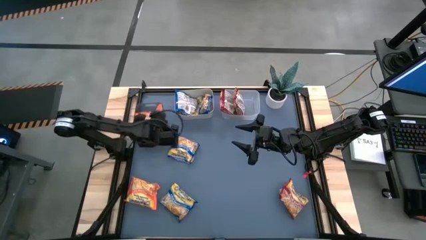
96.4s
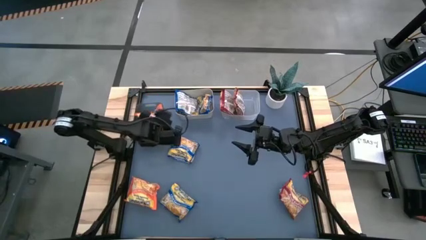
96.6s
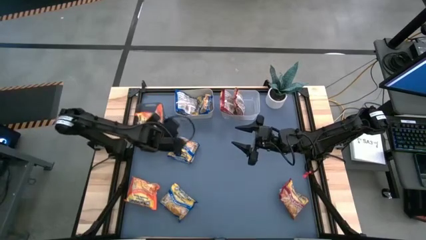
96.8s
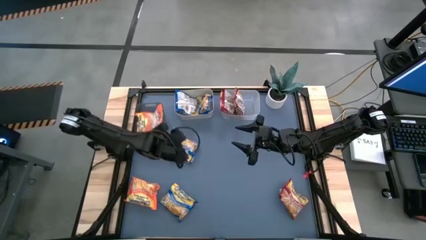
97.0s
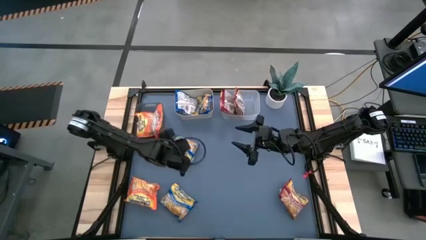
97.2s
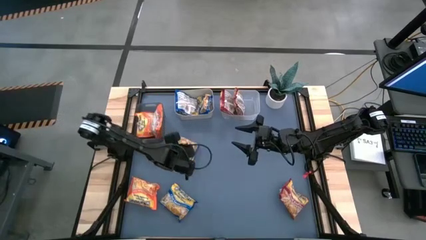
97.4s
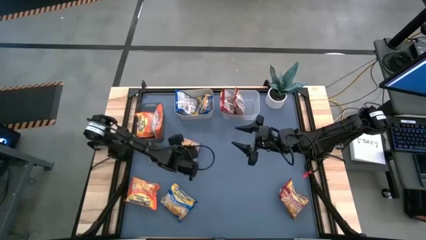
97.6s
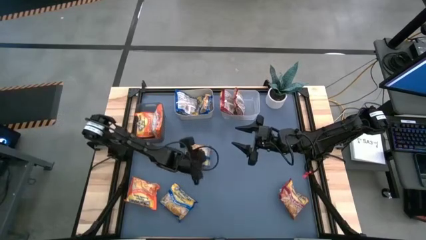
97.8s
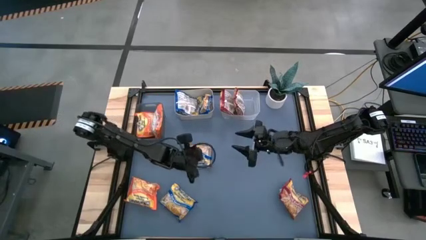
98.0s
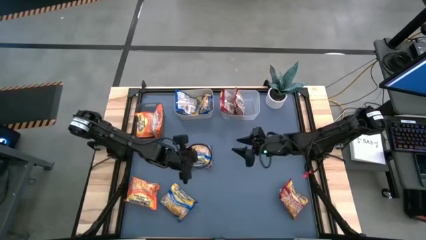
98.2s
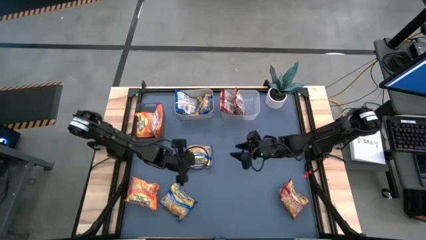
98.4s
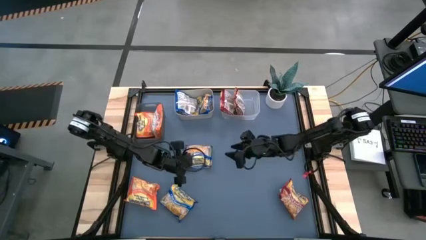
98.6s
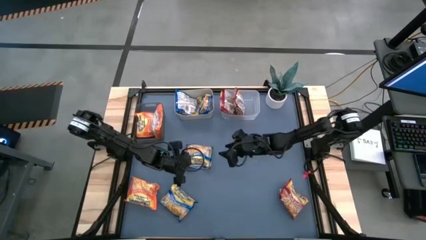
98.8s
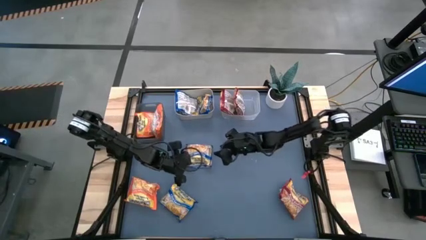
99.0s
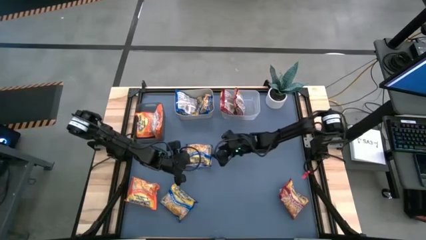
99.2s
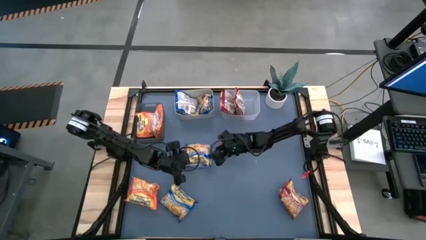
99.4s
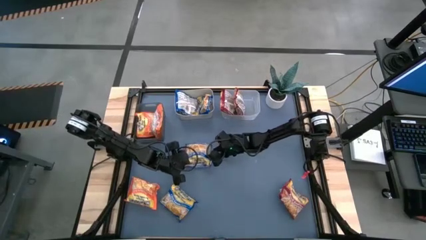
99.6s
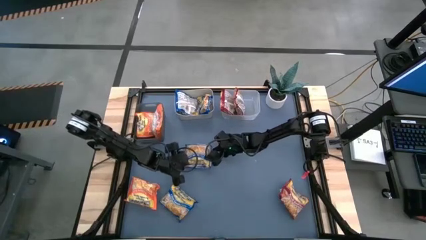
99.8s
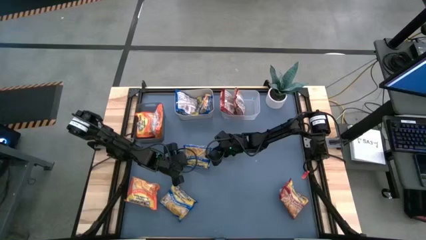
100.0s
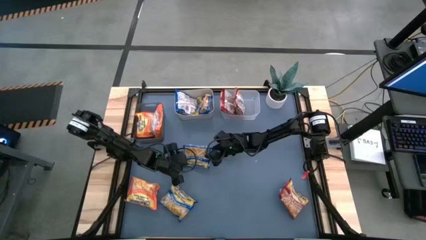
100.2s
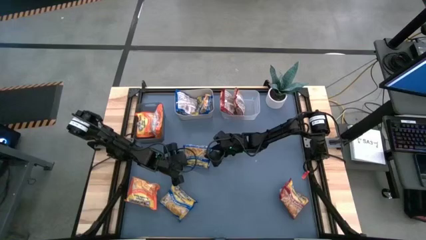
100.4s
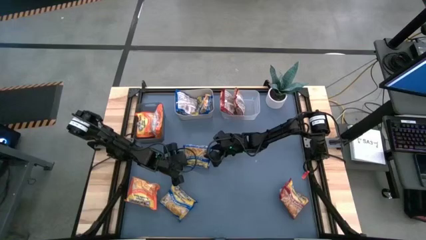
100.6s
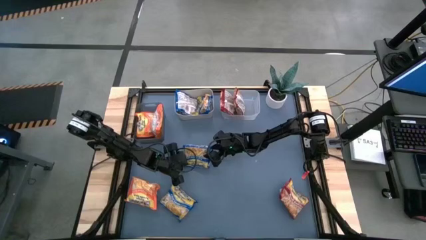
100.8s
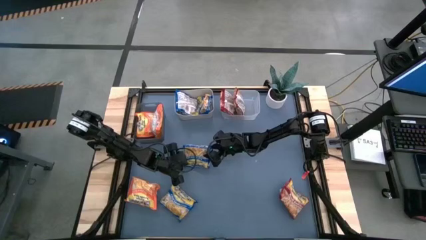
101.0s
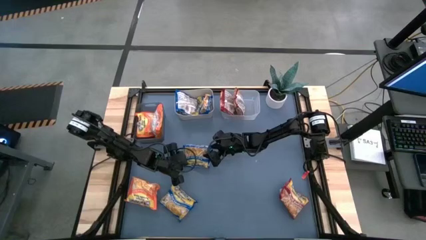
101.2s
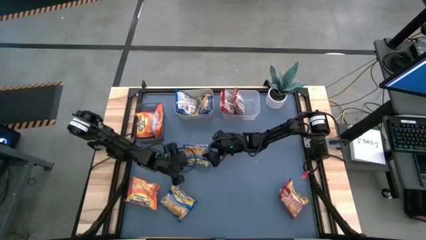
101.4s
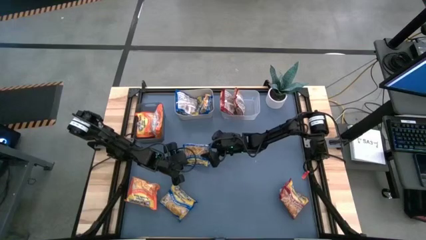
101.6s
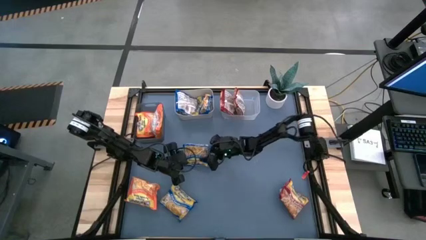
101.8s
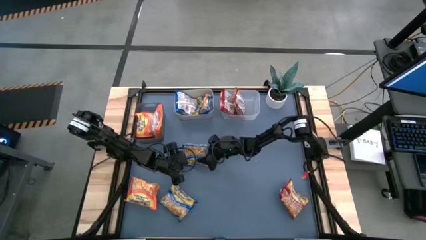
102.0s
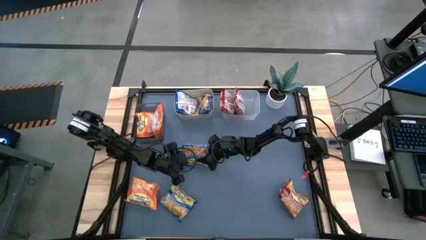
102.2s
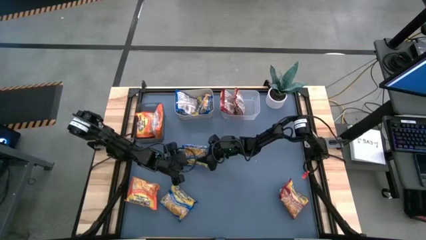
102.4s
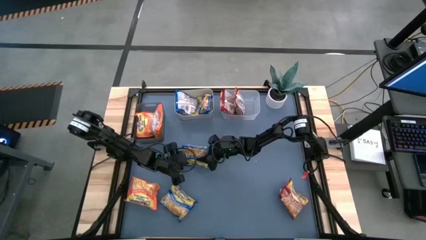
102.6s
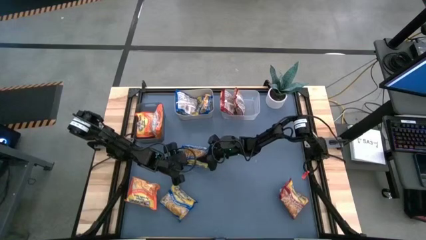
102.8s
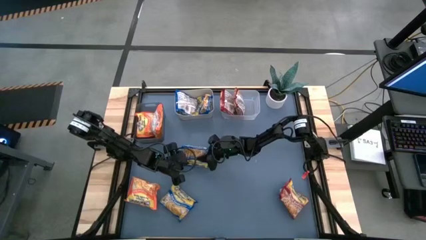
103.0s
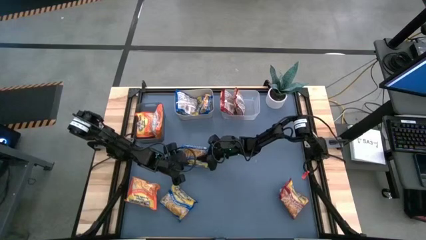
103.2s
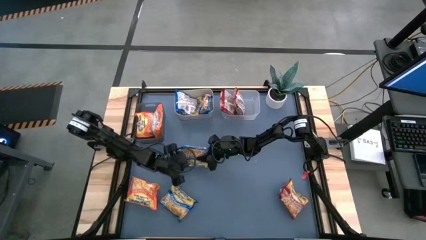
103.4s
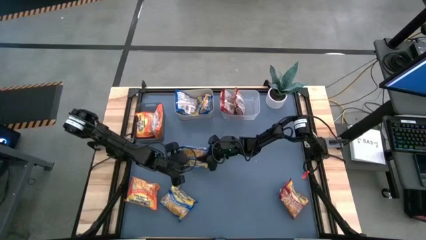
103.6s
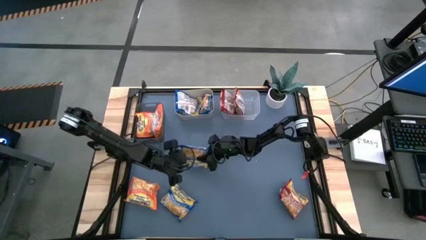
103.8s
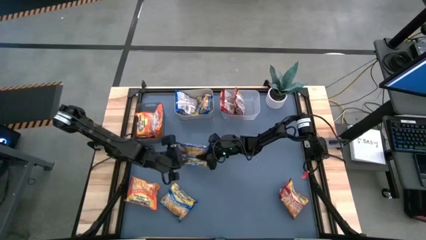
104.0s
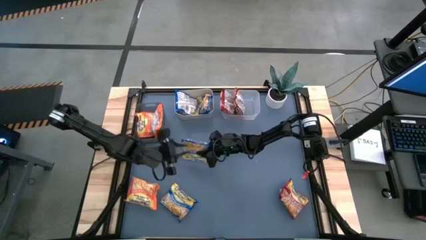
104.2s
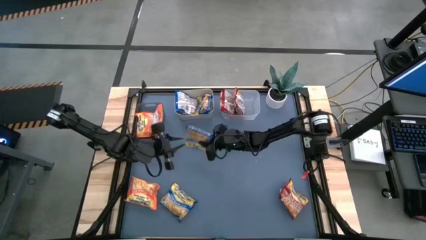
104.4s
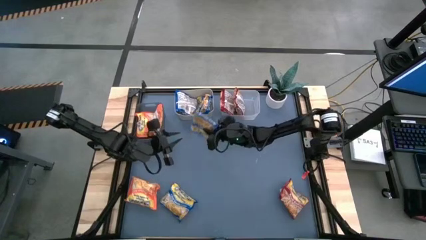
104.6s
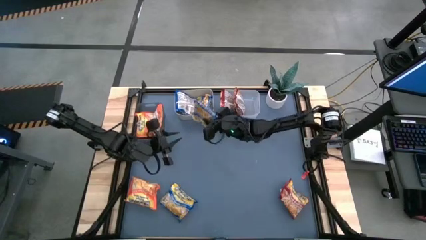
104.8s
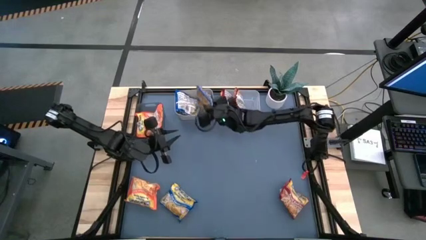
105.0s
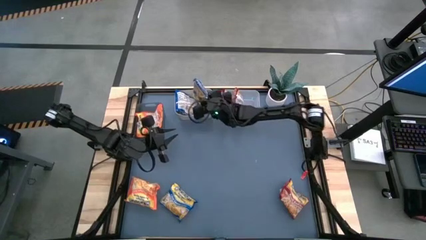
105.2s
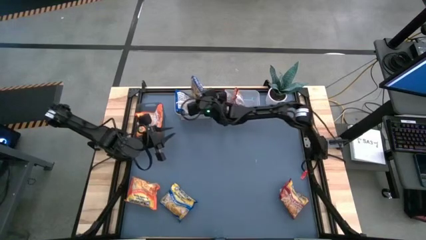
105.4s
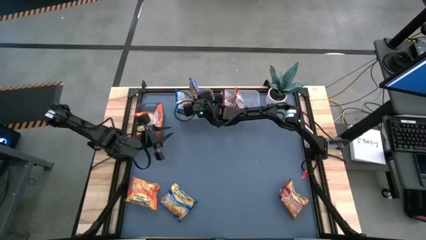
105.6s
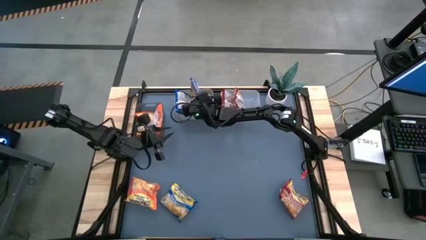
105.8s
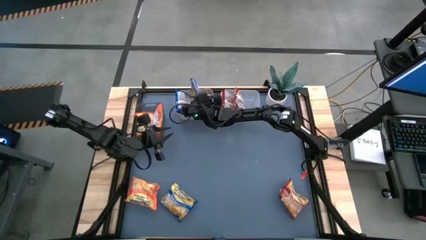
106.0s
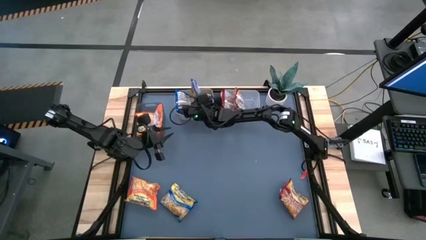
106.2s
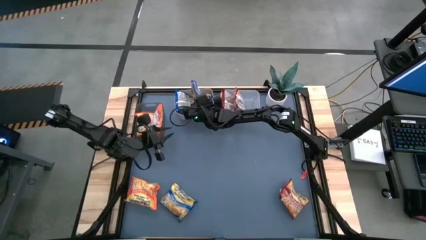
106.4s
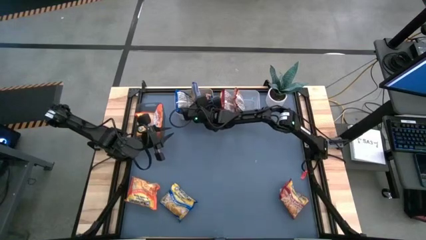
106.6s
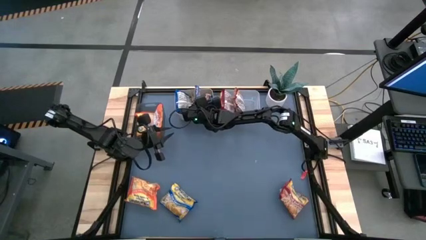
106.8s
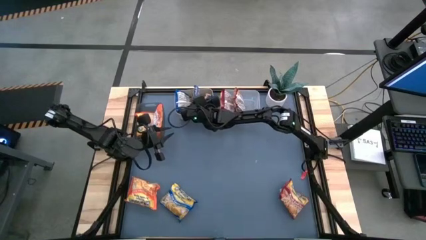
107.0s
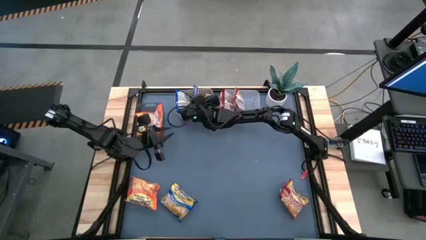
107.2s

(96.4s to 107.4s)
Task: Sort Maruchan noodles
Put the blue noodle pack into the gray bin

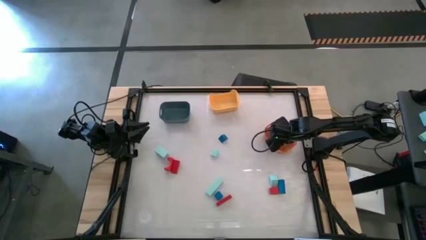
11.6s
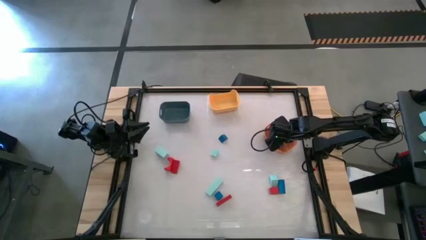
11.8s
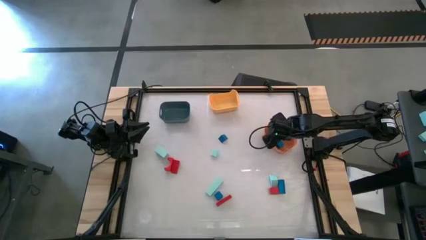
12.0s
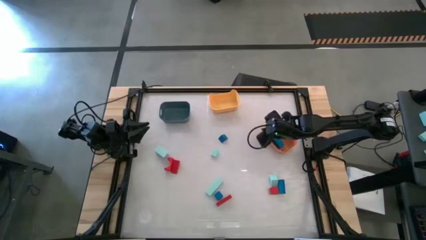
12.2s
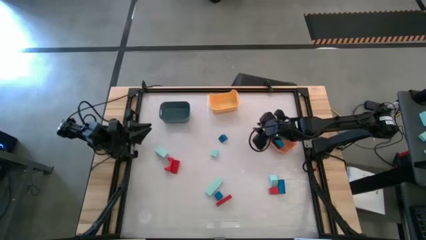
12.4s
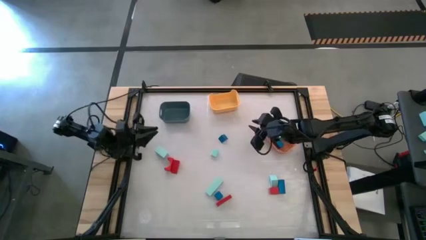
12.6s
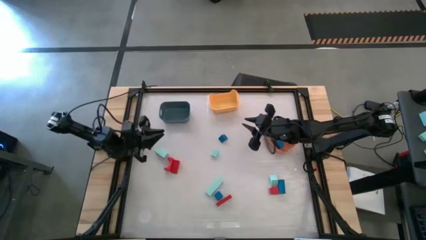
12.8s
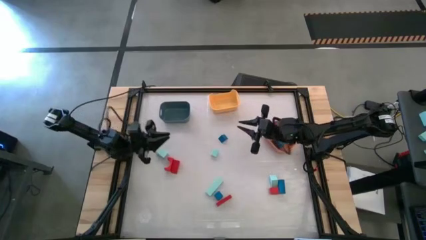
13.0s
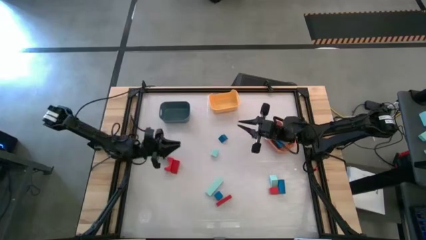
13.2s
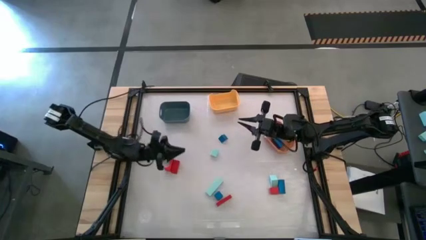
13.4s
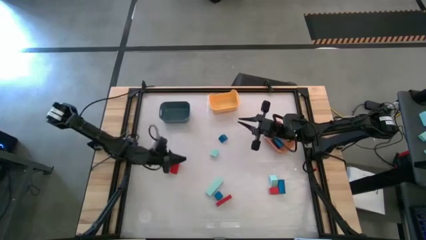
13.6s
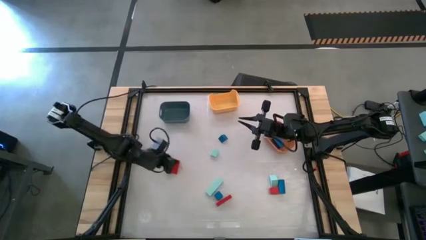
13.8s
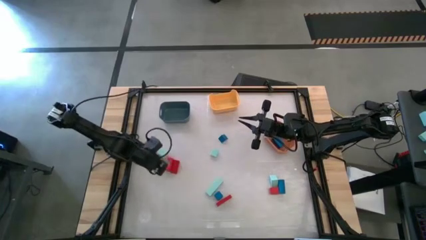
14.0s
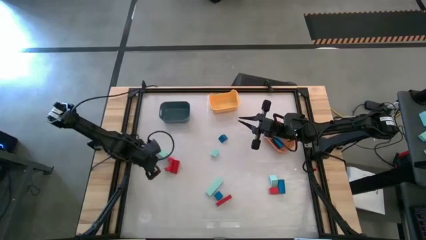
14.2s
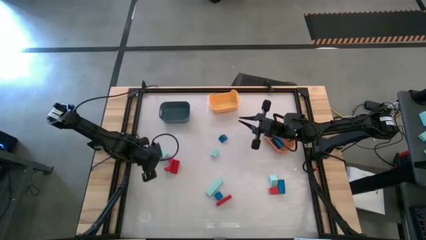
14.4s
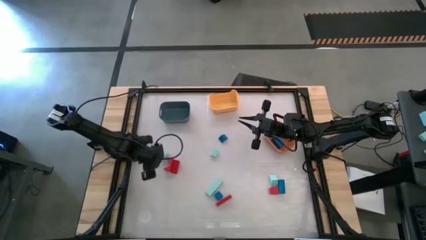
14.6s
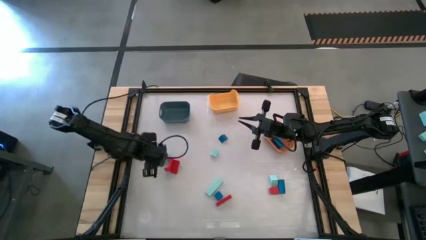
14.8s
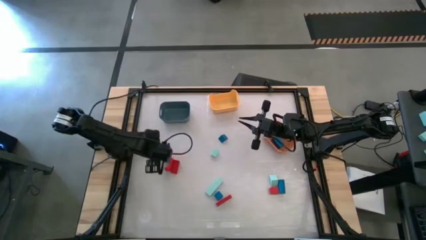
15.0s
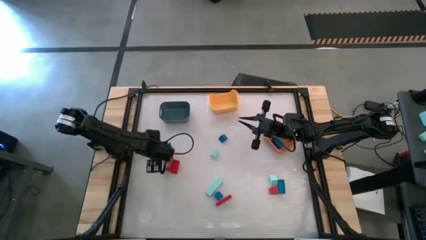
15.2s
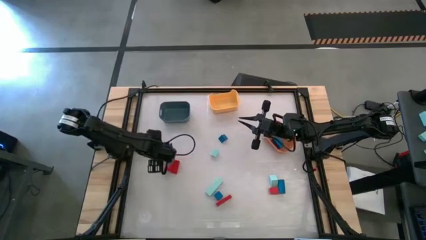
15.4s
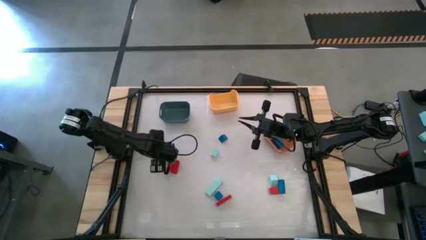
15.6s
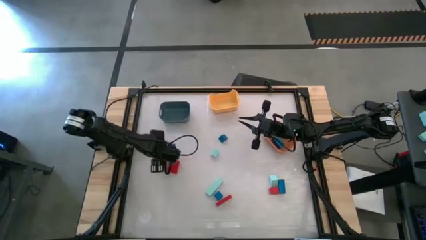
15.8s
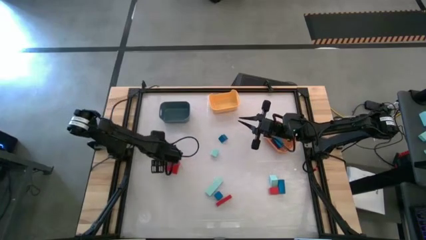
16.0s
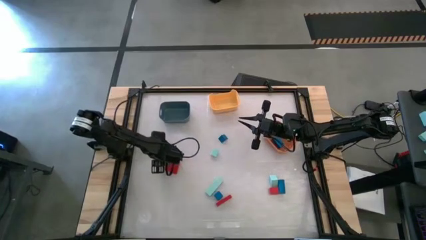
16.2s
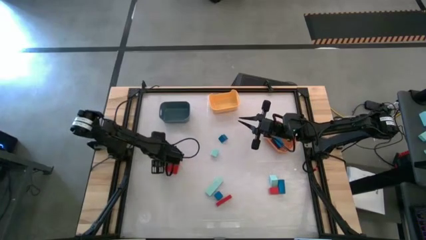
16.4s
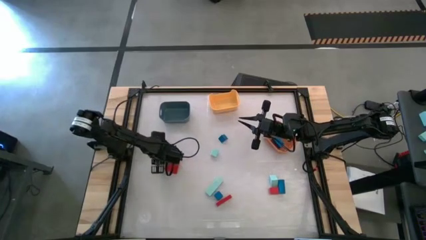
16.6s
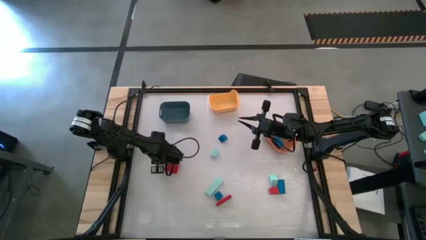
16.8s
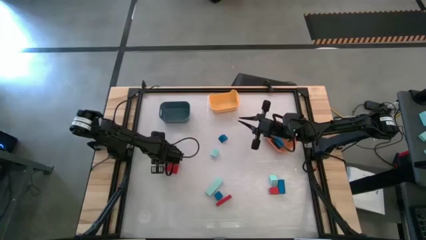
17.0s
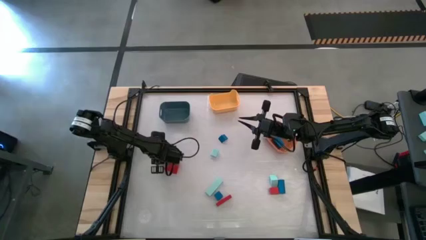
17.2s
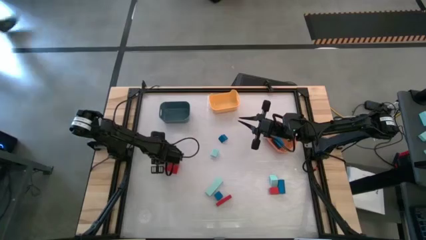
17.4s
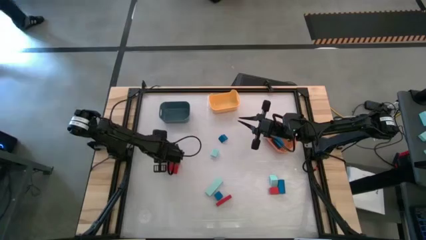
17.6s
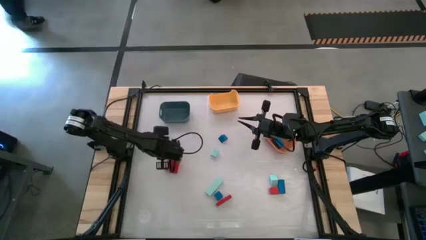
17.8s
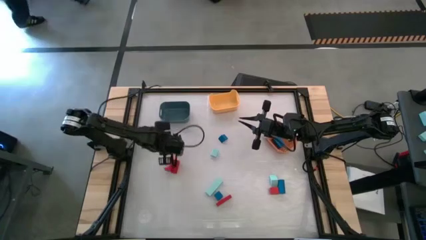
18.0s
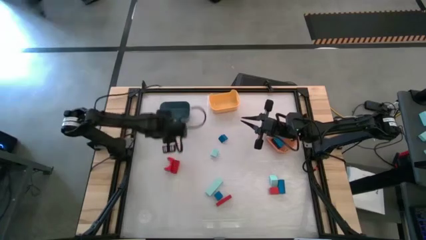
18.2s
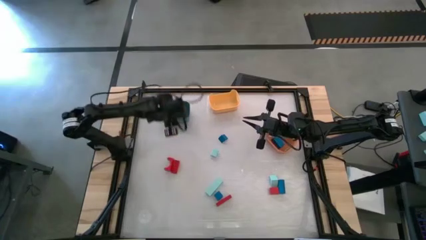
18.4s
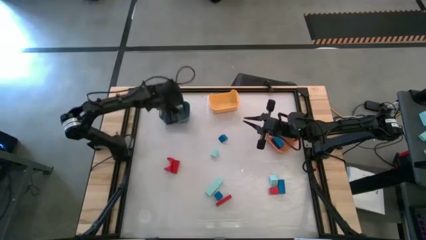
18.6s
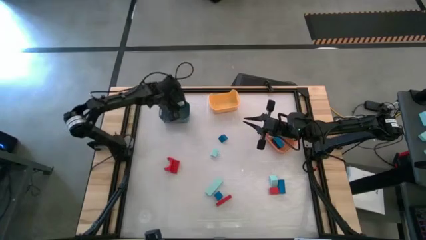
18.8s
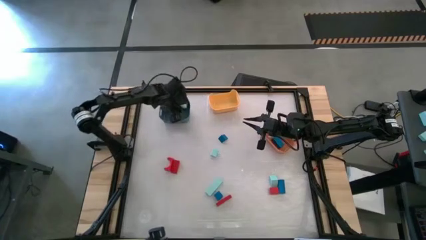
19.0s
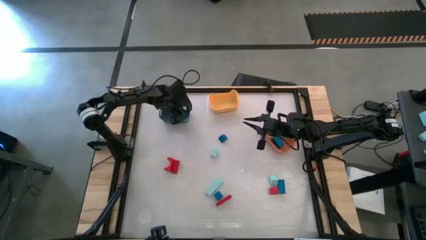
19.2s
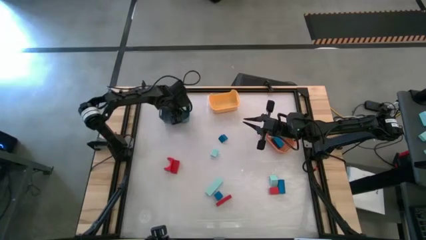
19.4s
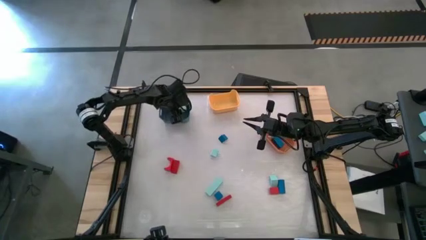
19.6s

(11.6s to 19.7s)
Task: Sort & place blocks by color
Put the light blue block into the blue bin
